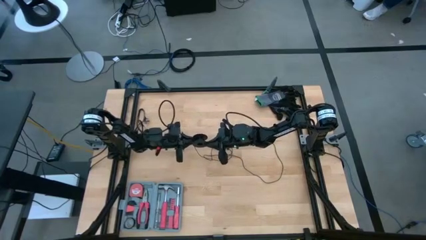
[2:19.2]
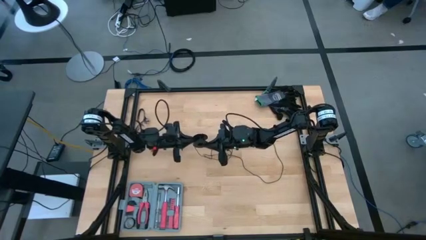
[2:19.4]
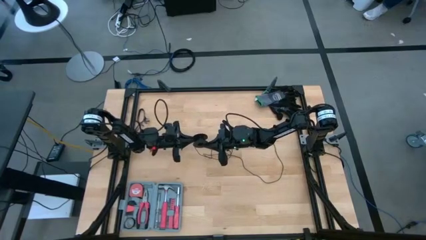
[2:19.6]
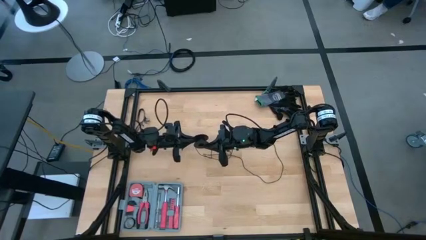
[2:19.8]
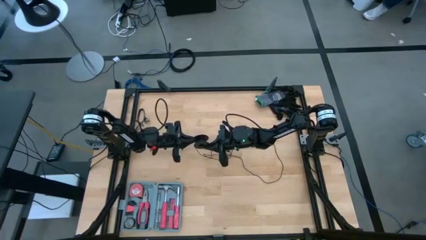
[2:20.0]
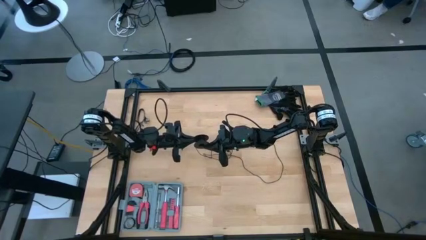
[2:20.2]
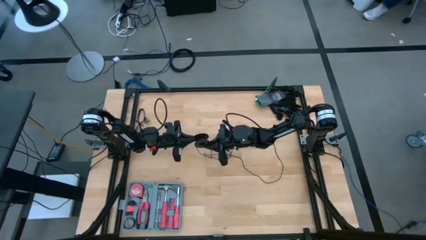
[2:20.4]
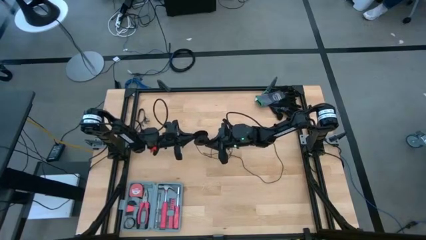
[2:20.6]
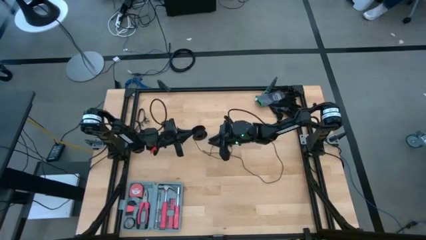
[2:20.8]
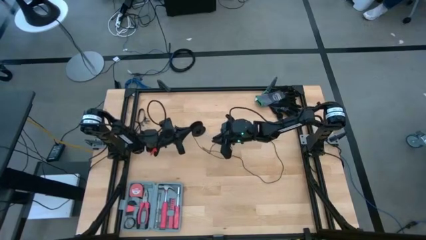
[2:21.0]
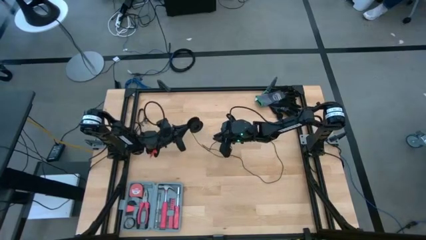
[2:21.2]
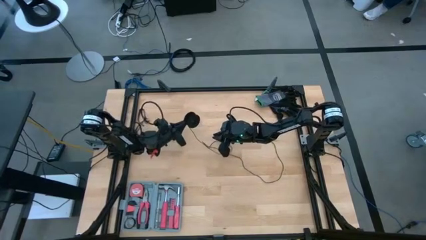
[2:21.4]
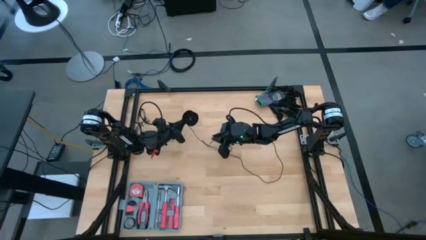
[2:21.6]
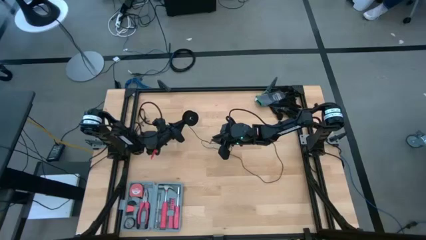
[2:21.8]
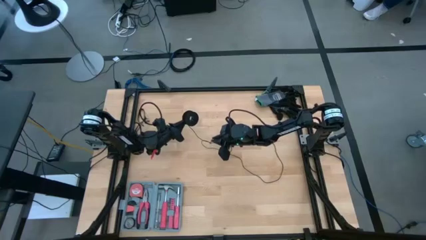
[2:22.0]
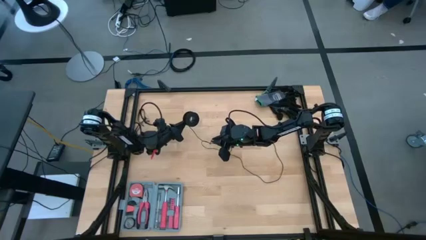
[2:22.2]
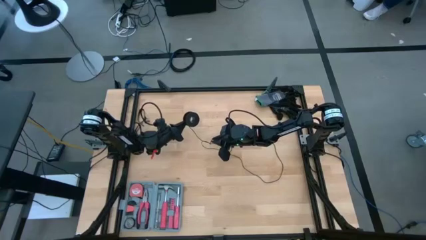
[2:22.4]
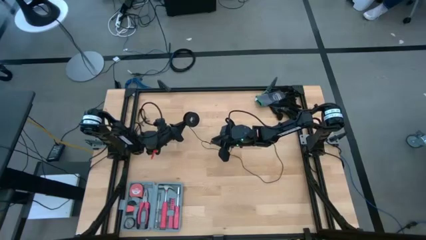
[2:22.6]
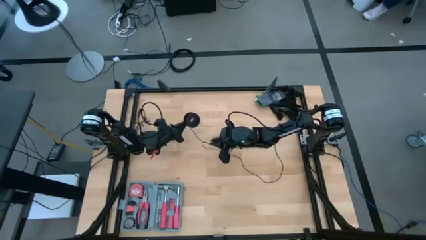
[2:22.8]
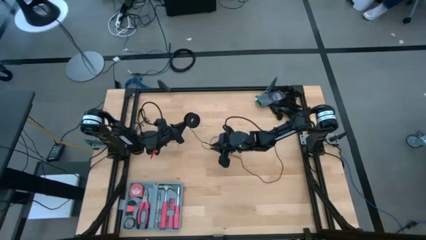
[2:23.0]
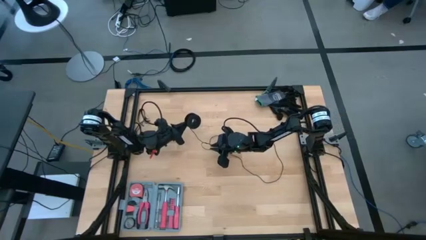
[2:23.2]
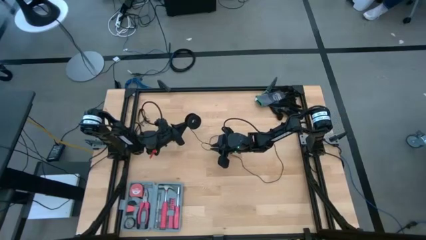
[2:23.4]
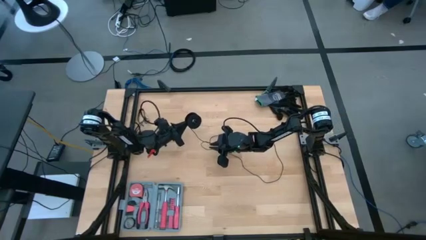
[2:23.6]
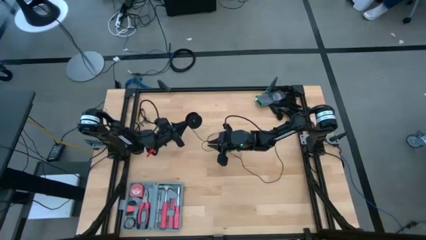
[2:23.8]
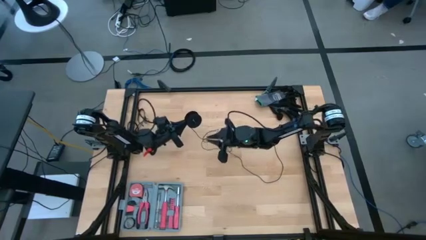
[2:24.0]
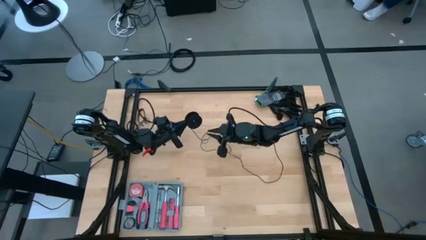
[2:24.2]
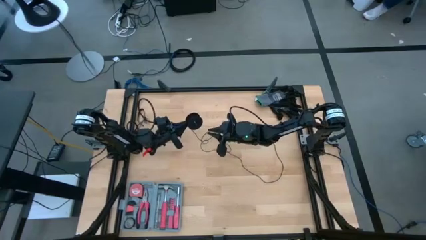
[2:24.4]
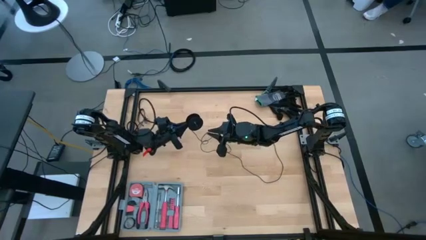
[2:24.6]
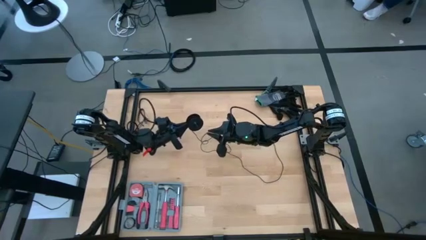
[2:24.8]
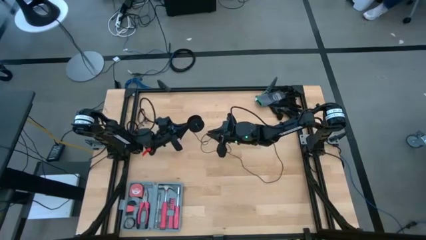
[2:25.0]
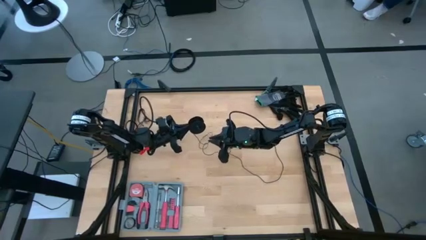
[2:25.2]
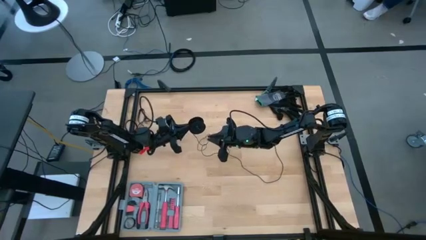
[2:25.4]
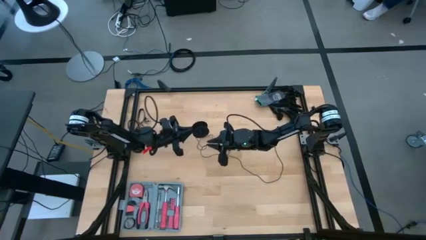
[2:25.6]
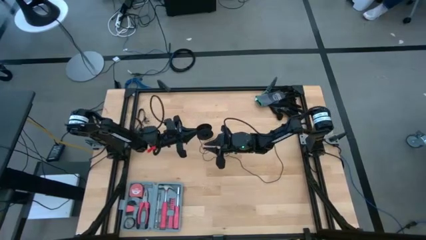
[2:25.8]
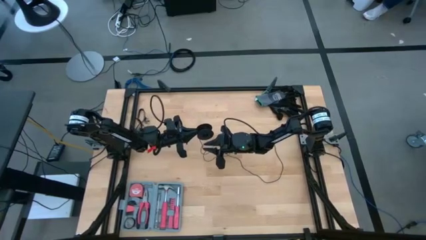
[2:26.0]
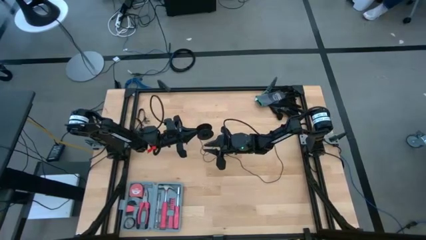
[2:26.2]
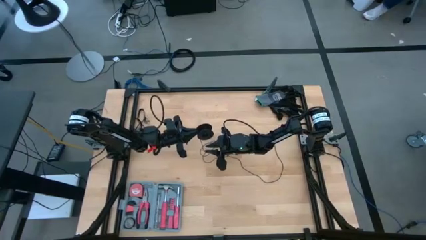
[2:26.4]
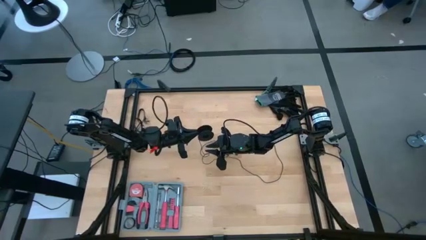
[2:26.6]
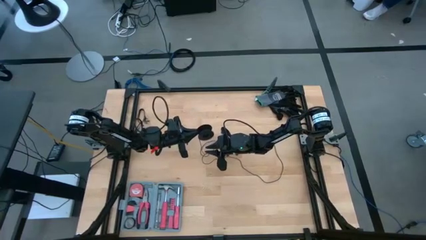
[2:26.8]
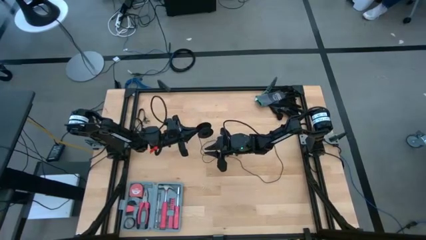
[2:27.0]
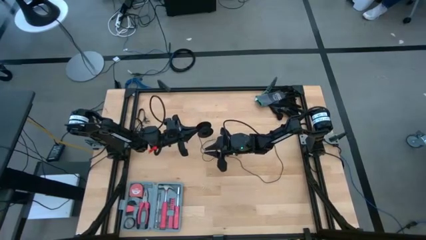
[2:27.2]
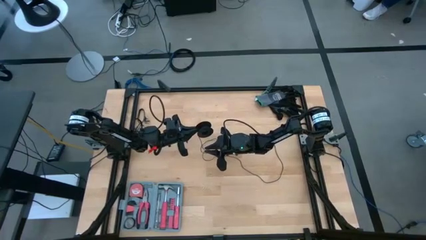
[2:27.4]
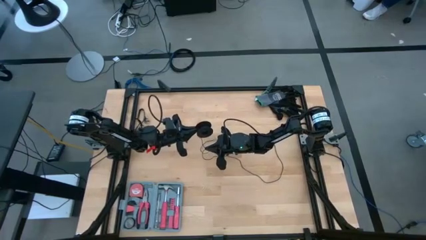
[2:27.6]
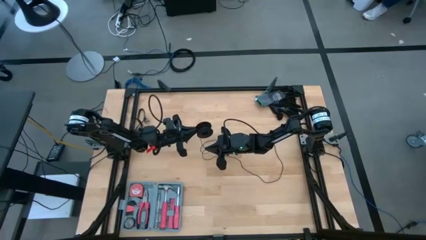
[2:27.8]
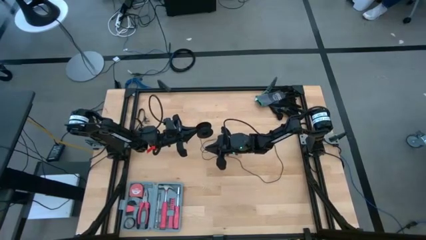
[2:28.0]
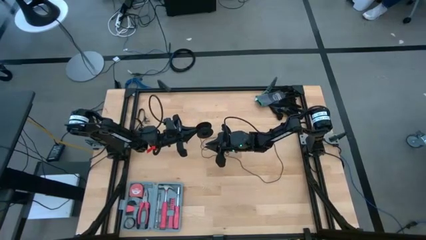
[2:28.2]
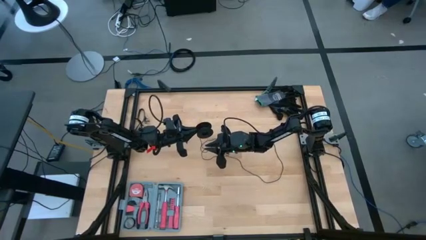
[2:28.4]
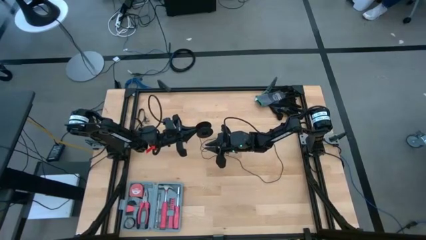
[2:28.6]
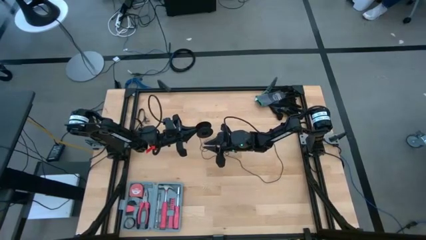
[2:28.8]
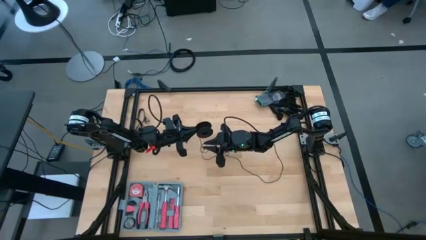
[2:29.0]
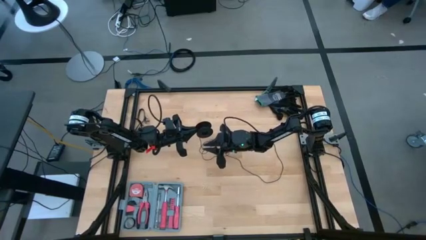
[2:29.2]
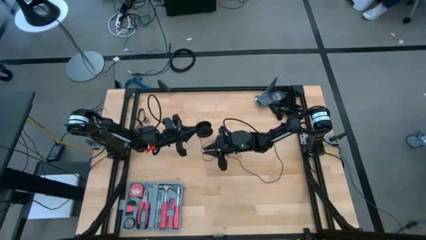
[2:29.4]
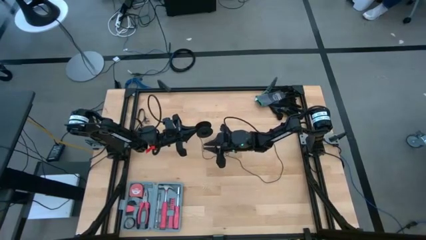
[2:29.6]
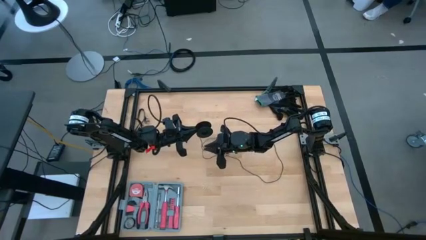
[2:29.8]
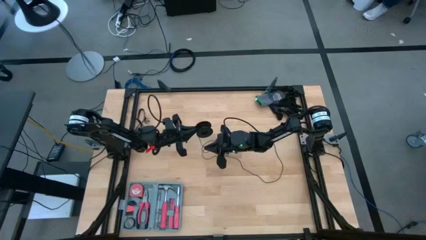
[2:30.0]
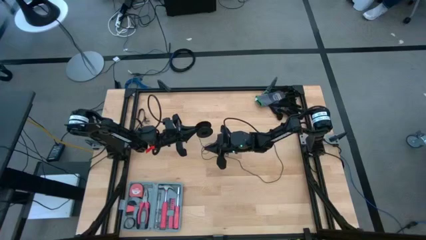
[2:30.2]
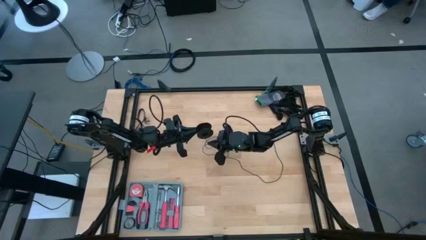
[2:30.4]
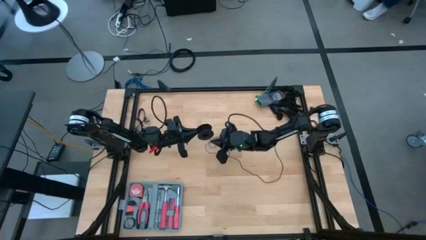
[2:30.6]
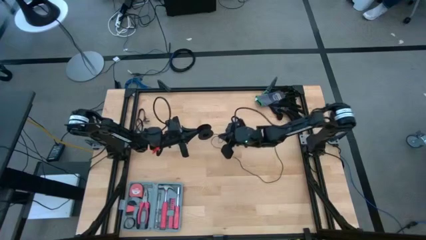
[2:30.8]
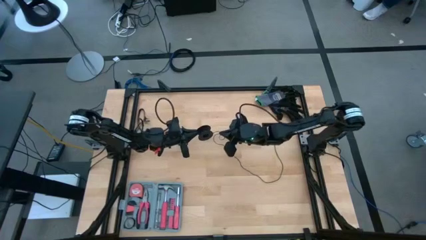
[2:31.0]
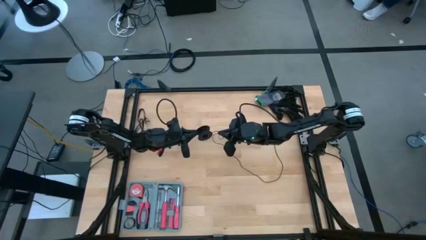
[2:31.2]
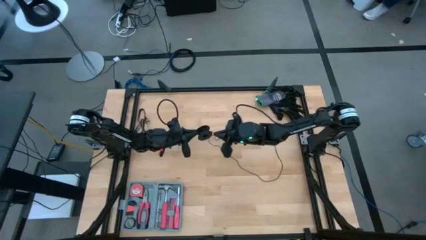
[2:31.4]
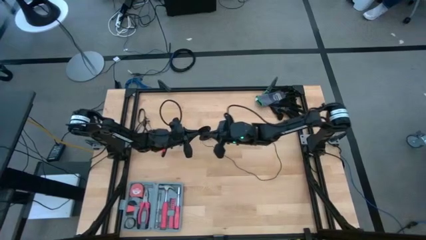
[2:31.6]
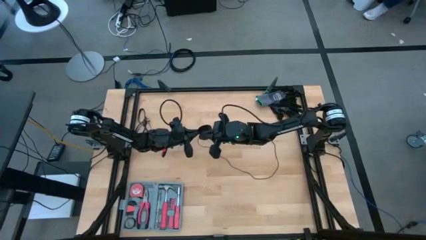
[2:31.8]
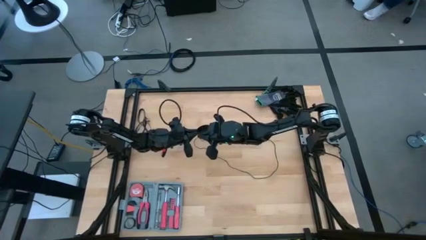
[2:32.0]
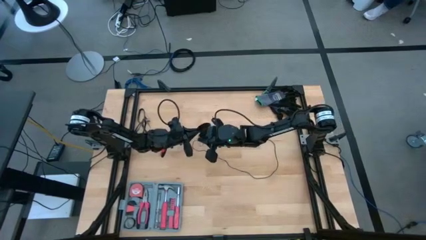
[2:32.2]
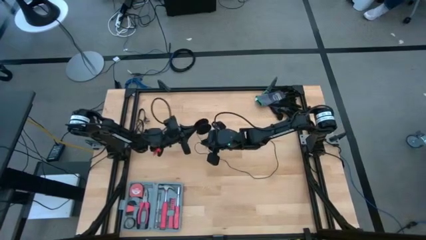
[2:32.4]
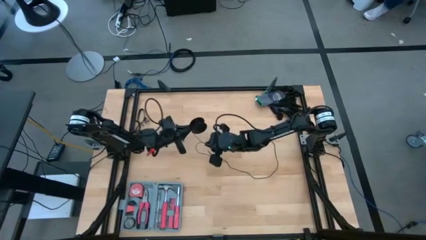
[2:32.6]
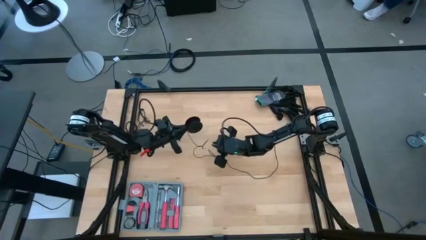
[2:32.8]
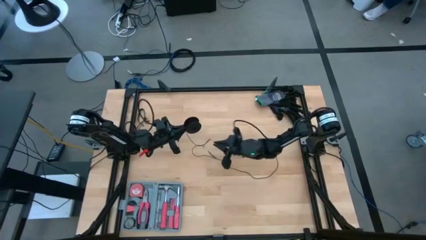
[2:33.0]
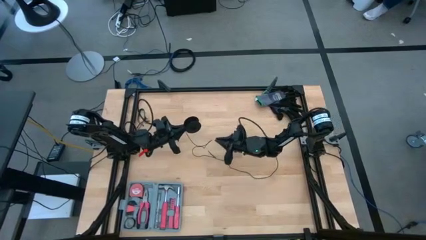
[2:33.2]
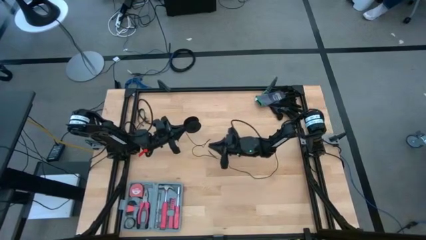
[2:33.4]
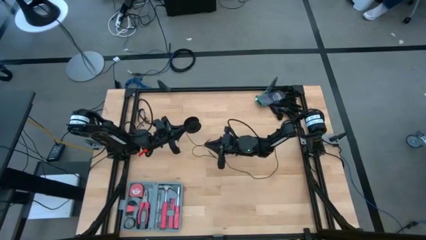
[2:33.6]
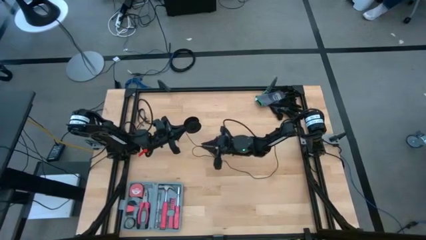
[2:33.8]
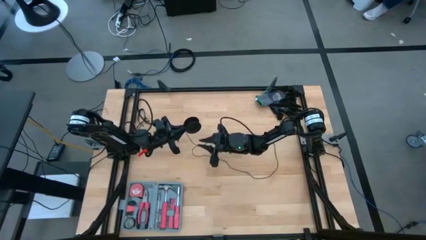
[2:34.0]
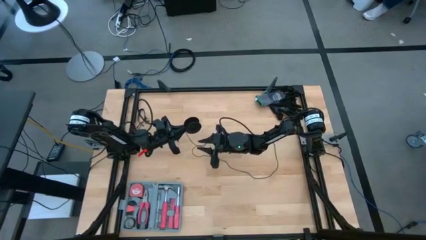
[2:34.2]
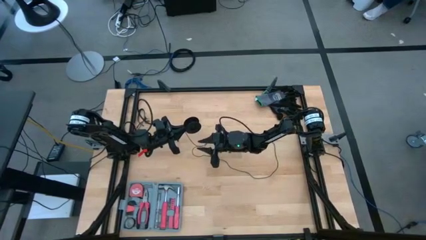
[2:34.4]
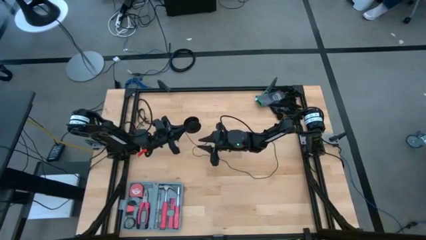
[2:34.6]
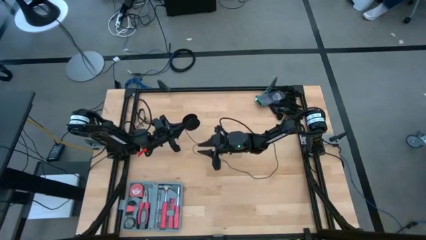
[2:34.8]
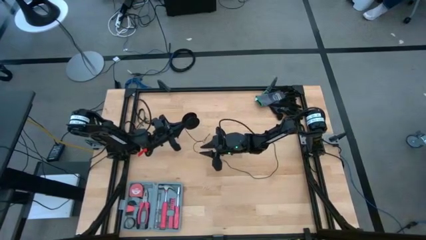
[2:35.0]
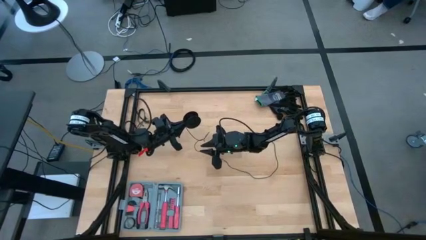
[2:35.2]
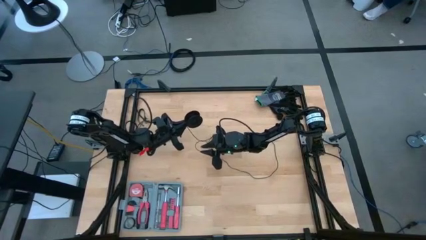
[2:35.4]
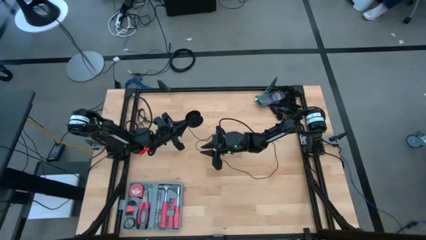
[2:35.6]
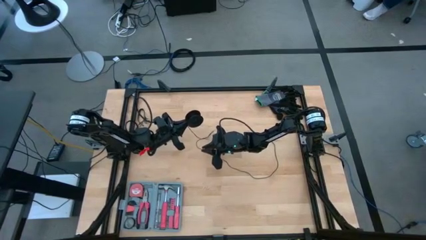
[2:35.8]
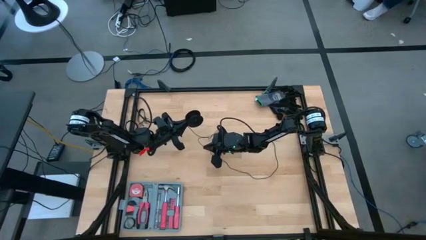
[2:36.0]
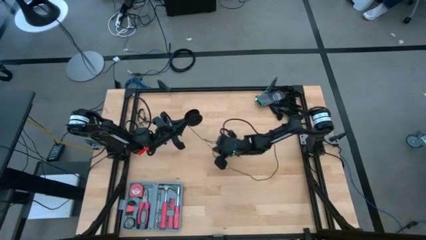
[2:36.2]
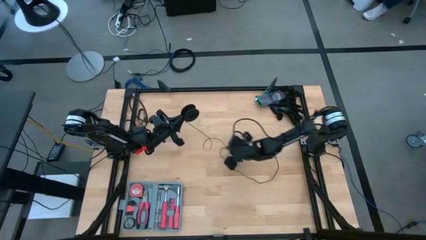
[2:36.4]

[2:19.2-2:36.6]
Task: Coil cords
Coil the black wire on the spool
